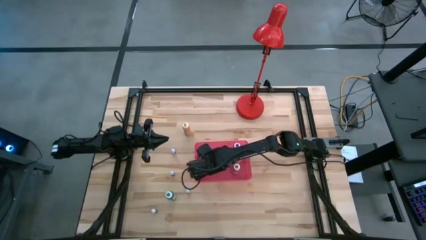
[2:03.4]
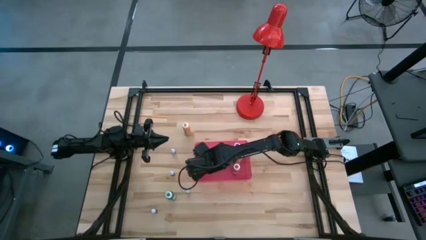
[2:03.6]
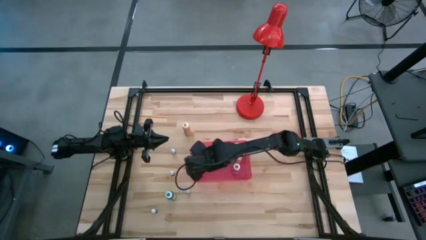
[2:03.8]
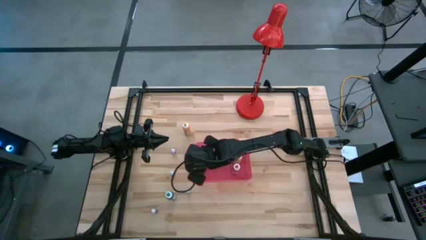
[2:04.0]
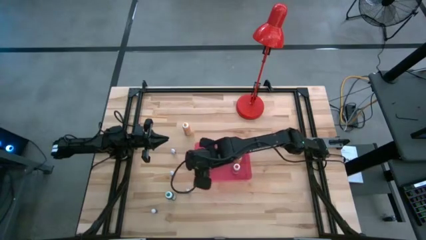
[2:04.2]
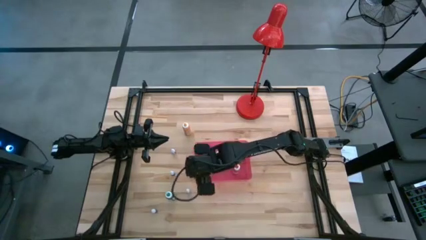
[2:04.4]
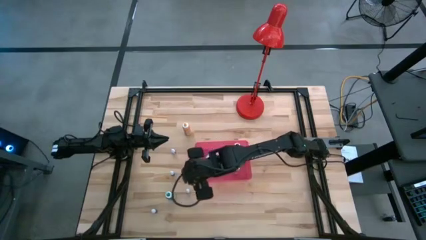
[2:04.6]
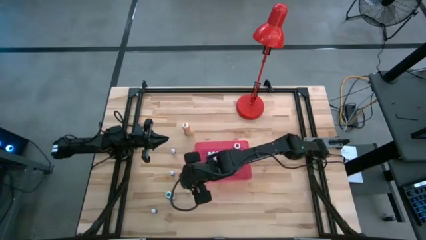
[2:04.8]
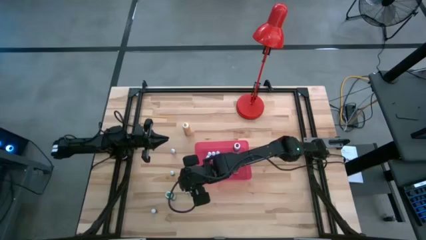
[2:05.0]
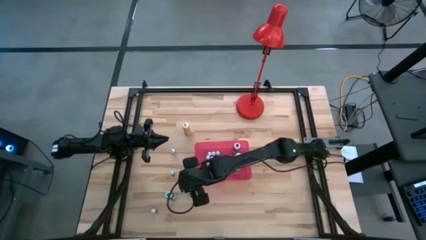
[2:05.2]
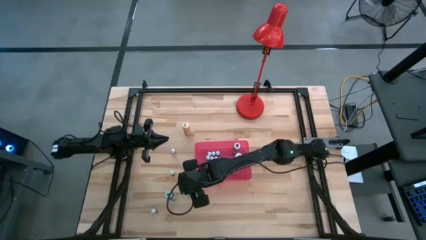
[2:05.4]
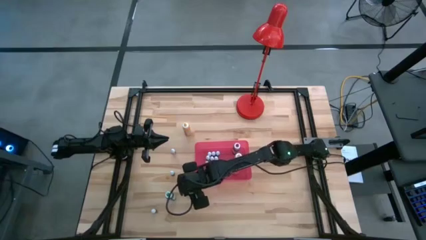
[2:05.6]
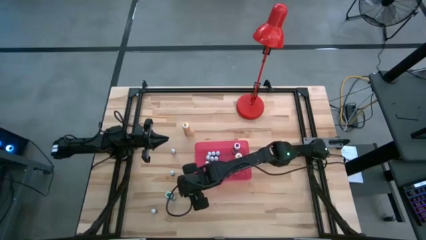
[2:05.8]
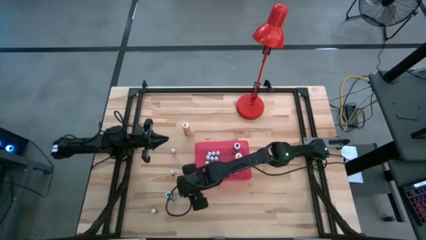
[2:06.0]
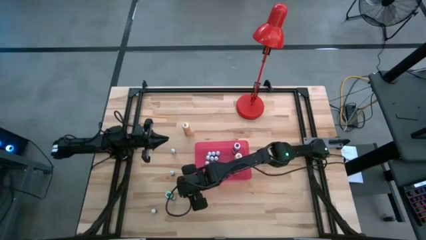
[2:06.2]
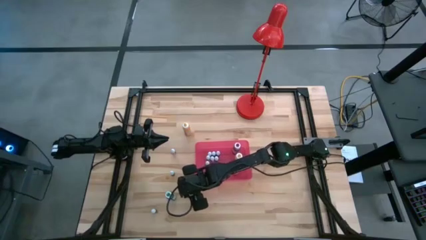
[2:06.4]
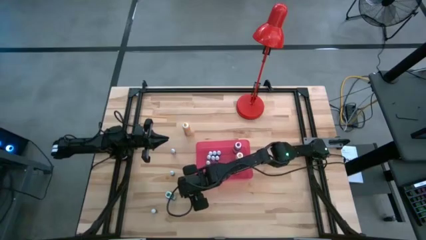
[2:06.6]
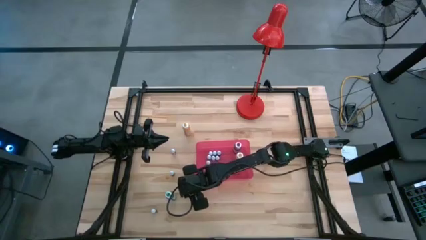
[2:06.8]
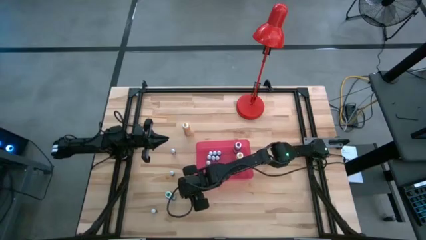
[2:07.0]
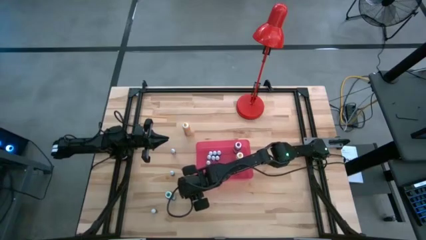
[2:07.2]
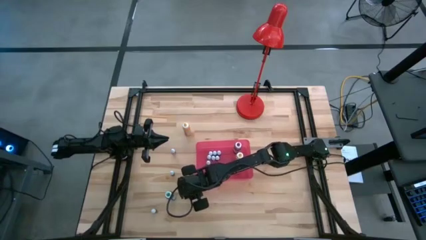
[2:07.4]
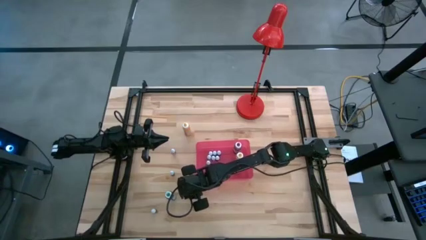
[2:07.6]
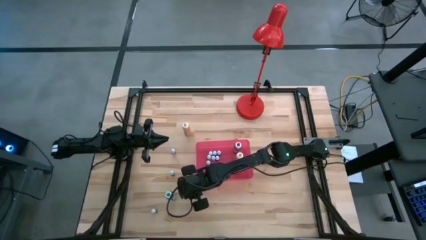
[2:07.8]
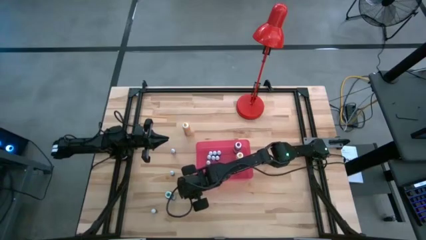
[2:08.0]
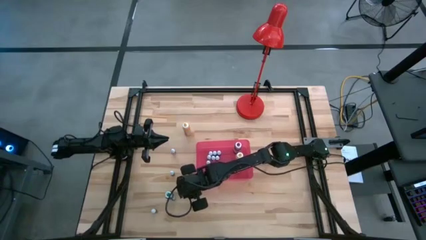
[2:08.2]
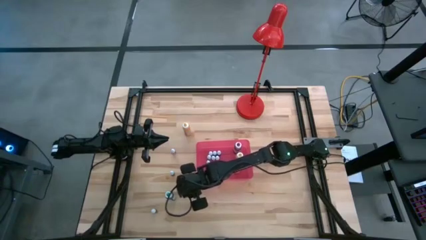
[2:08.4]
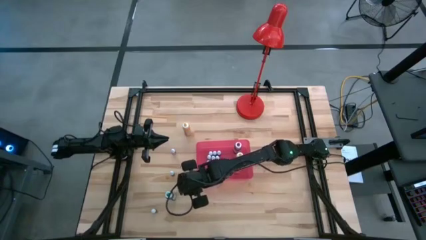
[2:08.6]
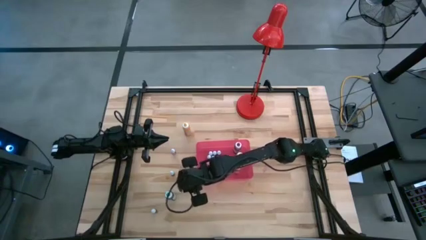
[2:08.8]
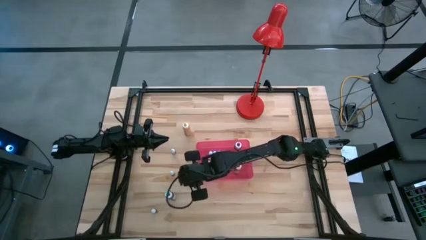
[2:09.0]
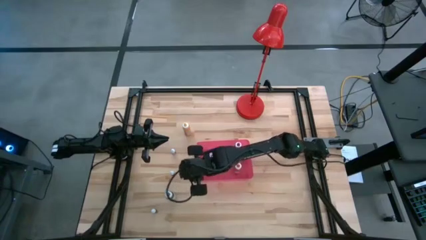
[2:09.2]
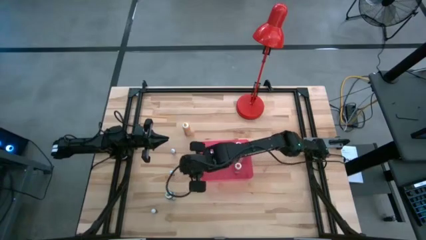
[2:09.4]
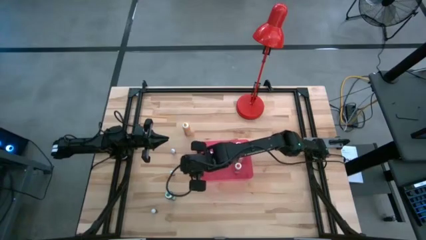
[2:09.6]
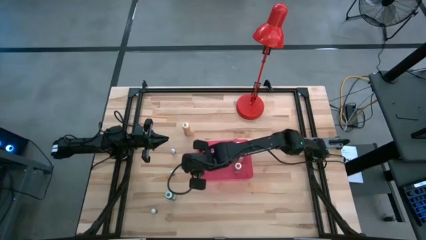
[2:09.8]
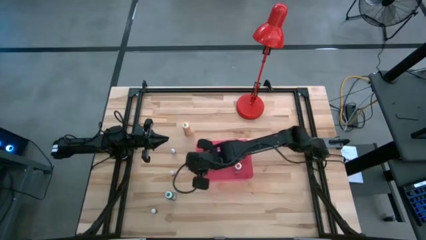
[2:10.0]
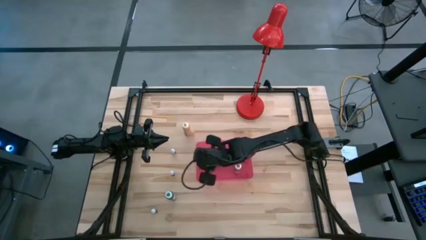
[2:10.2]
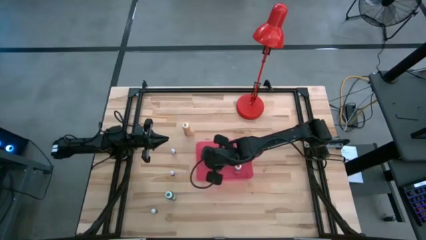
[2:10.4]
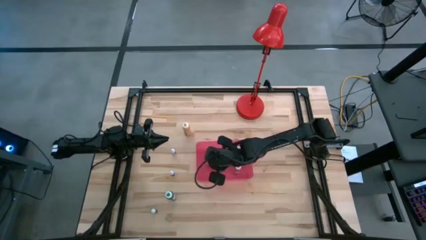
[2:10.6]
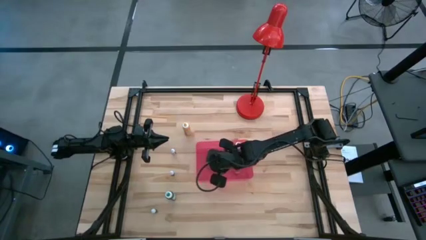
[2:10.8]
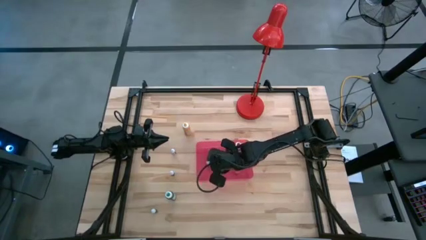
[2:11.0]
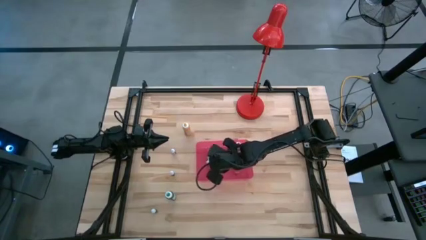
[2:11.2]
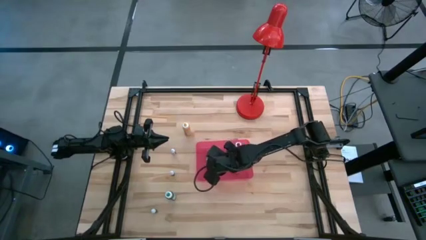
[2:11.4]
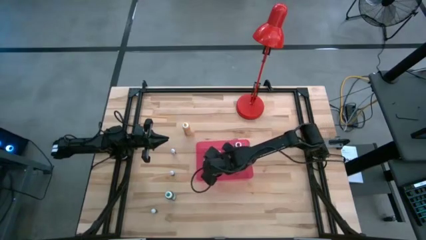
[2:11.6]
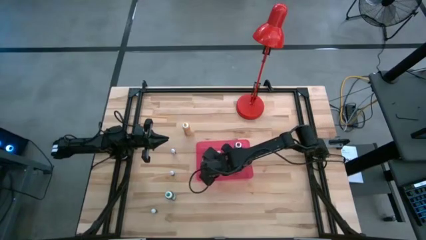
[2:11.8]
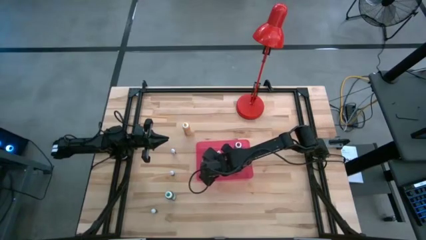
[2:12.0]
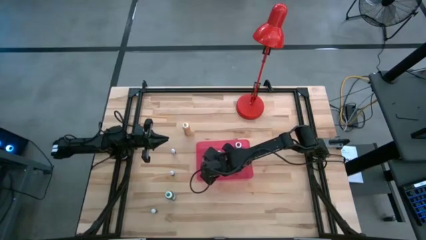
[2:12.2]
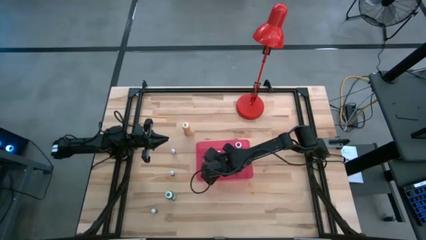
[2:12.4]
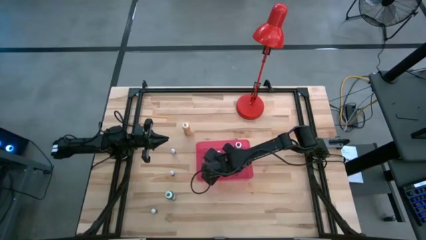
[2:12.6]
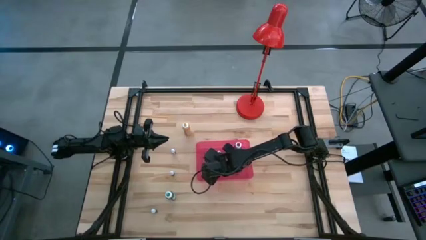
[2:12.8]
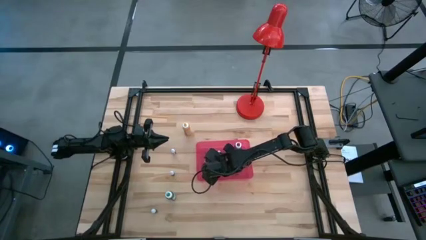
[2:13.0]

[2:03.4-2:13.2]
Task: Pick & Place food coloring
Put the small red food coloring bottle into the red bin

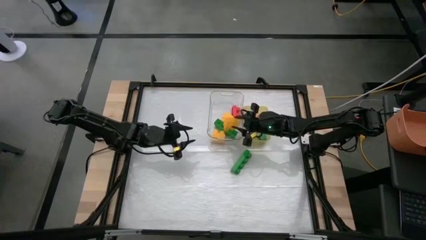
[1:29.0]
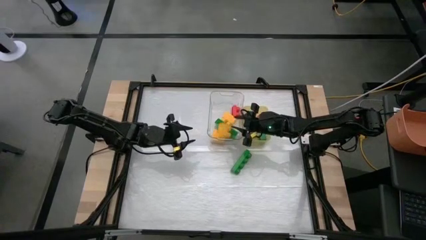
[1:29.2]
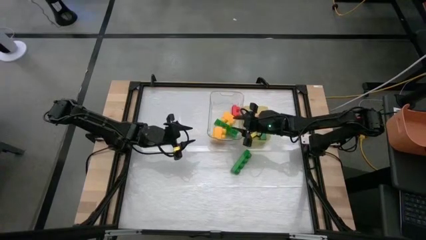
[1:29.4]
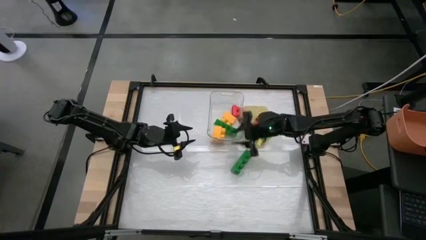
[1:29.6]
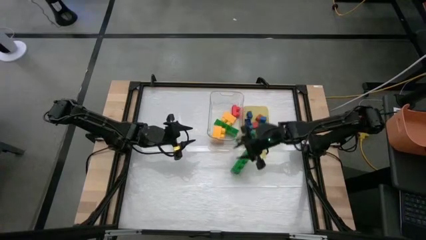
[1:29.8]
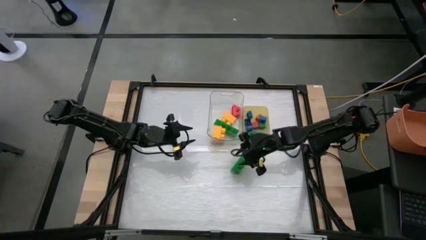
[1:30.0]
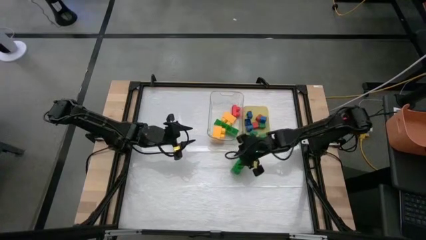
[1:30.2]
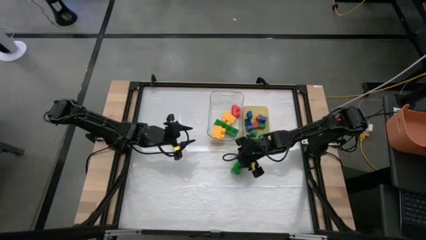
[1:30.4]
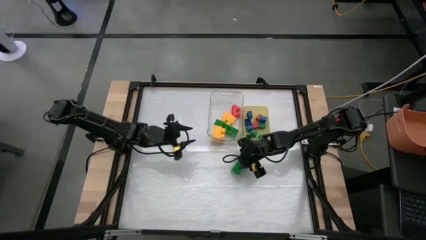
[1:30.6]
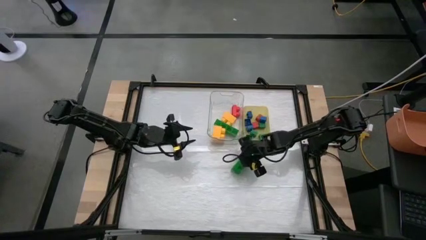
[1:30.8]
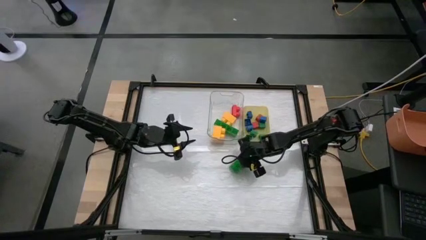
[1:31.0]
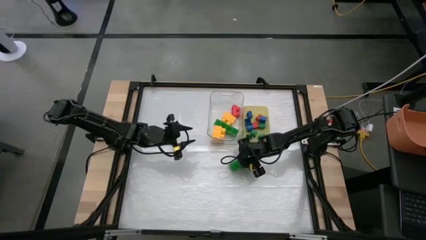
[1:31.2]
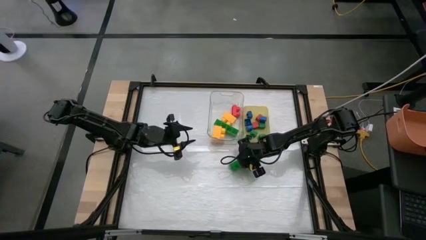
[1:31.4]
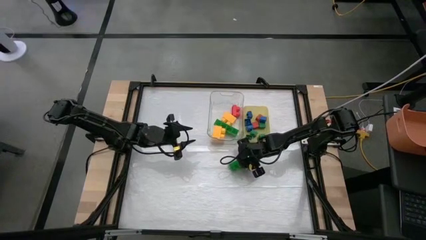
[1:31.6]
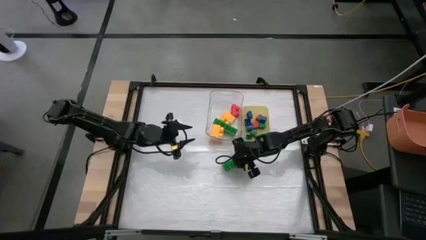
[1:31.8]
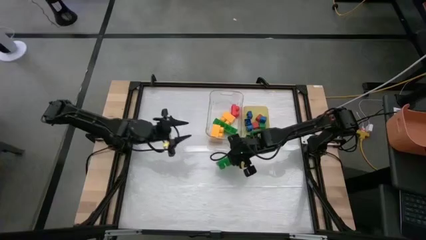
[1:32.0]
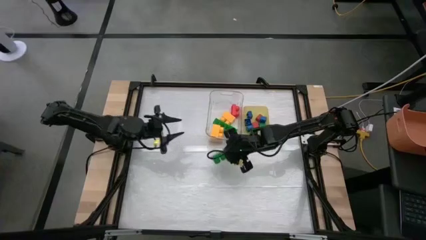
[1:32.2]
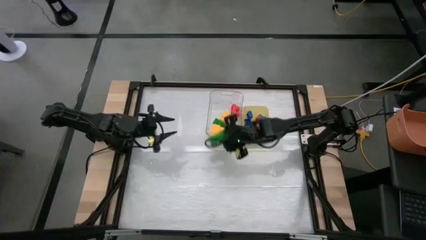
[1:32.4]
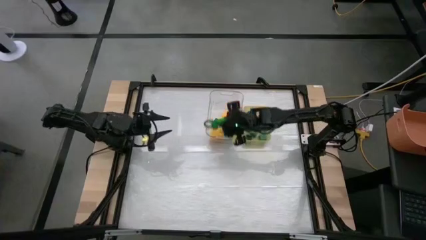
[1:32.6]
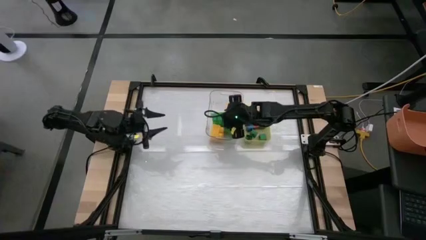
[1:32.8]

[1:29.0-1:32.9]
Task: Sort blocks by size
Put the large green game piece into the transparent bin

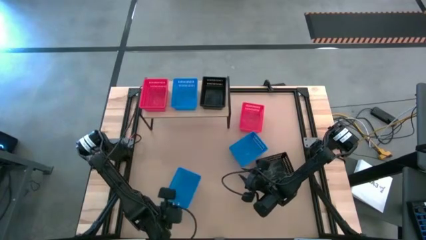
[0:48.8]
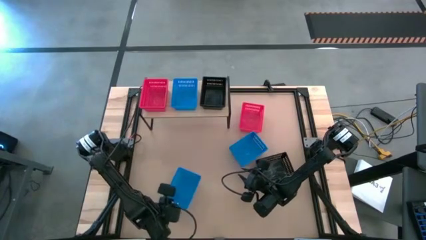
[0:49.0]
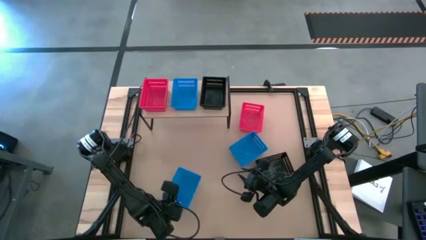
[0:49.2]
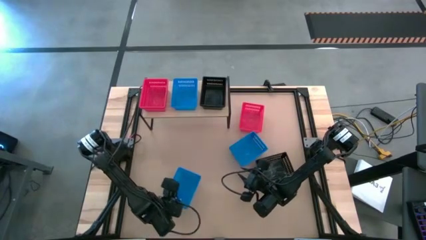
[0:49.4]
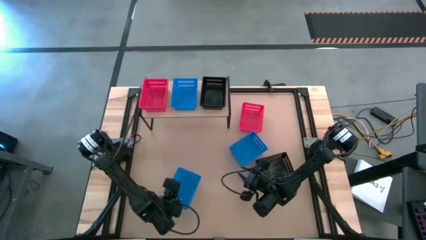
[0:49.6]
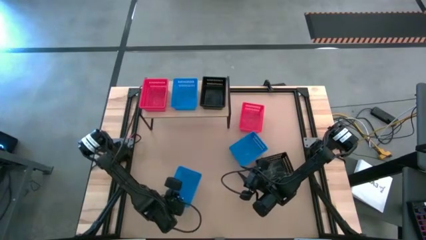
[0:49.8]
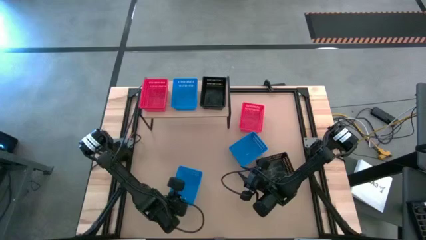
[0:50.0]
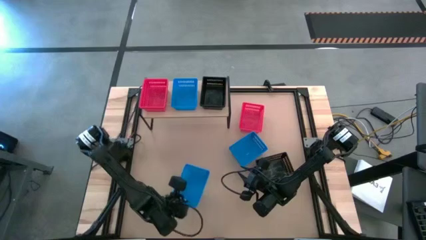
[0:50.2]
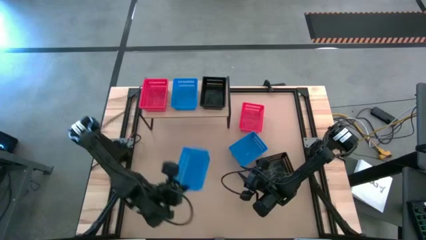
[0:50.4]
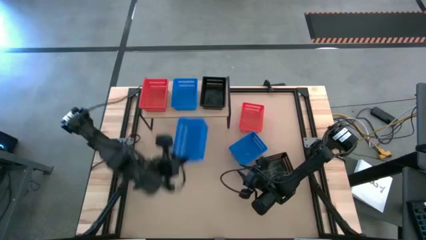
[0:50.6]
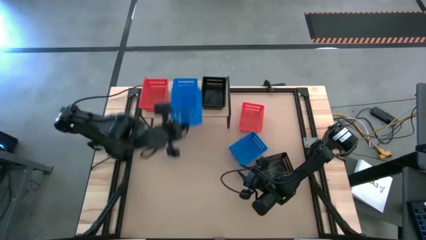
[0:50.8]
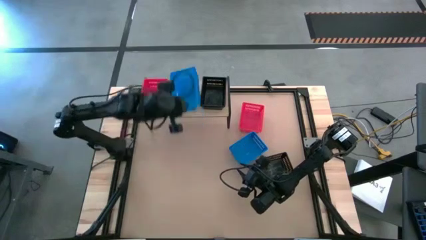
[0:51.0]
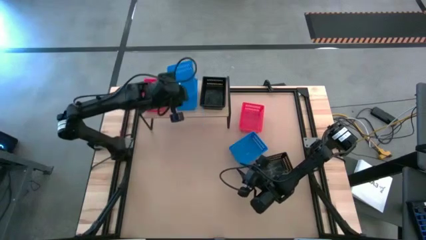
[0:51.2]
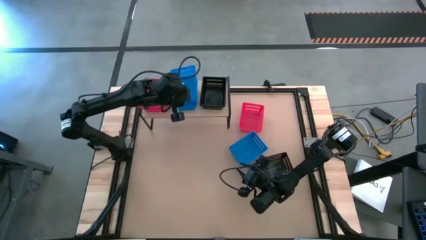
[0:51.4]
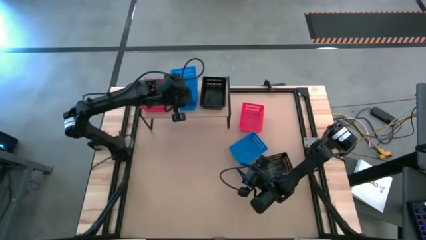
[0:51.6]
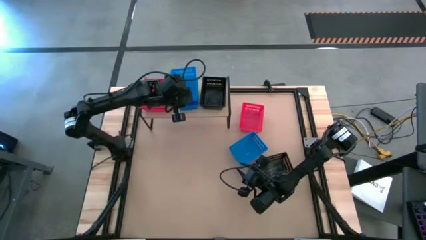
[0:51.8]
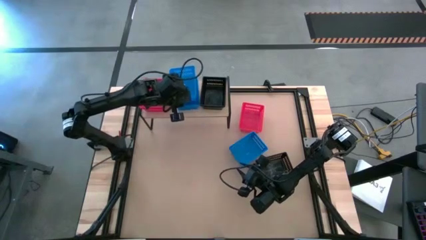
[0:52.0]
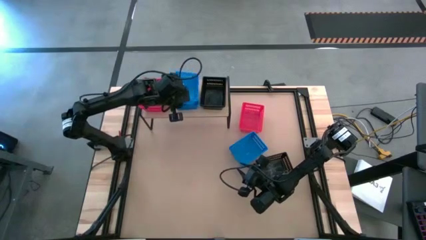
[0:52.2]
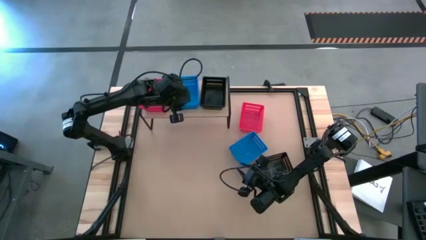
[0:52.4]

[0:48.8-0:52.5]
Task: Stack baskets on shelf by color
Stack the left bottom blue bin on top of the blue bin on the shelf
